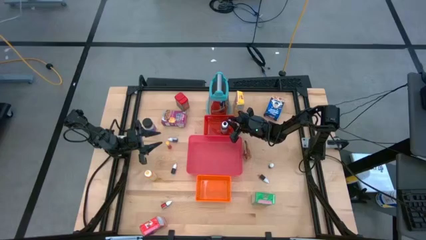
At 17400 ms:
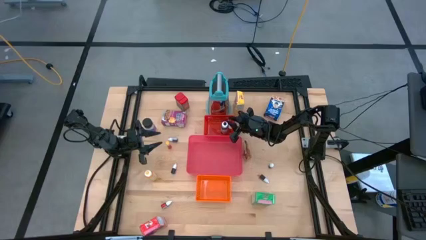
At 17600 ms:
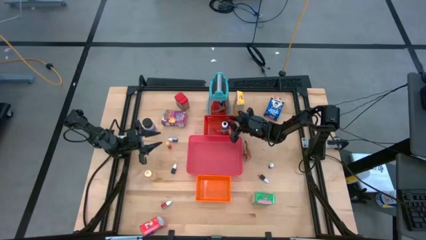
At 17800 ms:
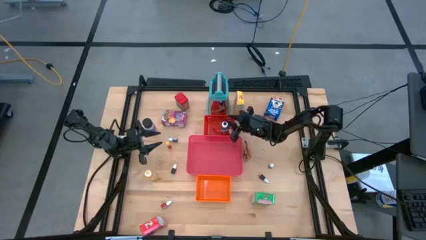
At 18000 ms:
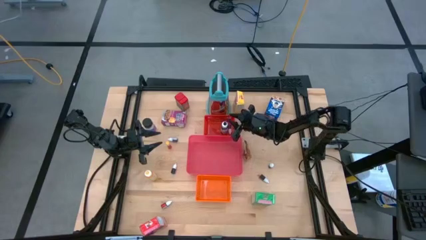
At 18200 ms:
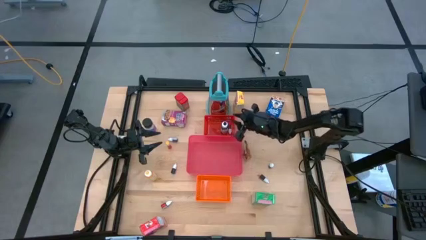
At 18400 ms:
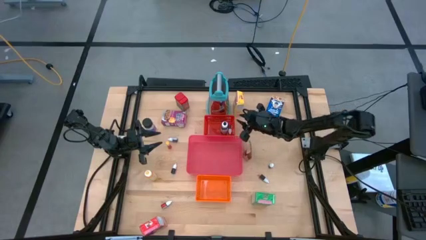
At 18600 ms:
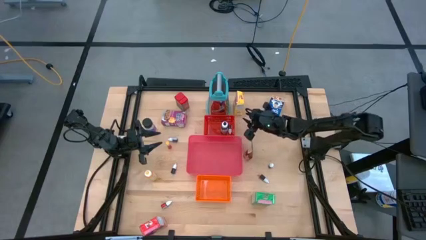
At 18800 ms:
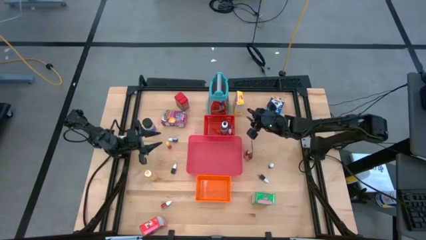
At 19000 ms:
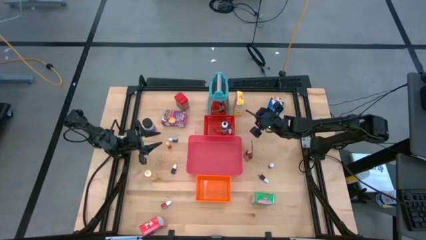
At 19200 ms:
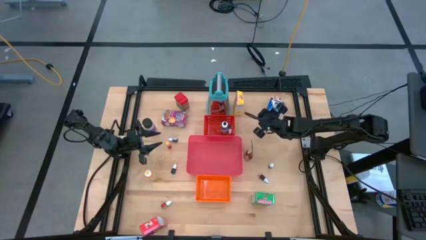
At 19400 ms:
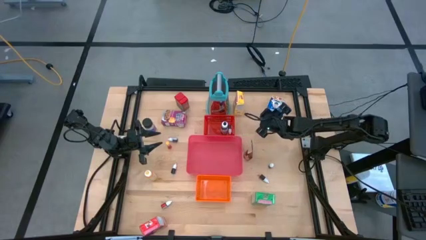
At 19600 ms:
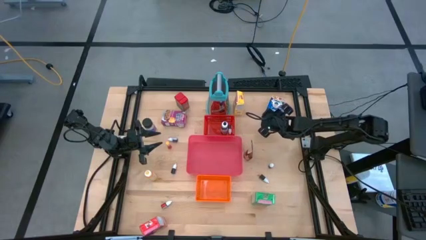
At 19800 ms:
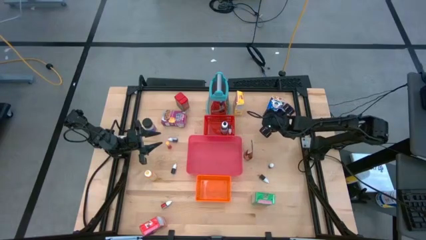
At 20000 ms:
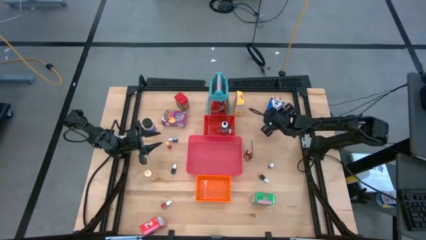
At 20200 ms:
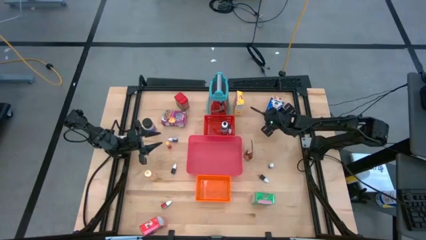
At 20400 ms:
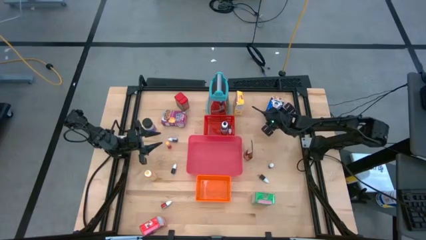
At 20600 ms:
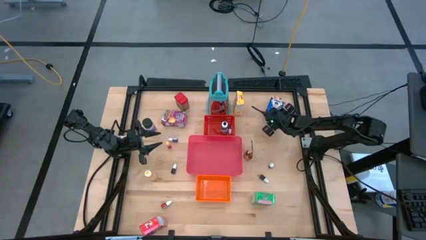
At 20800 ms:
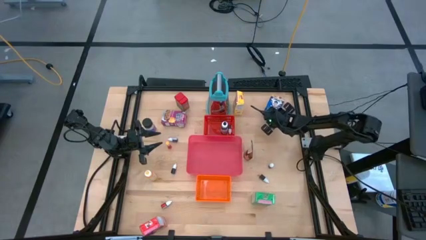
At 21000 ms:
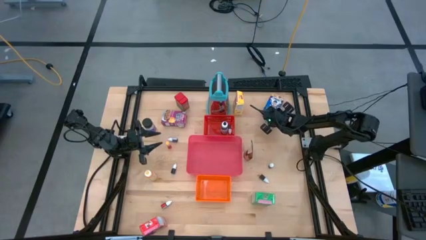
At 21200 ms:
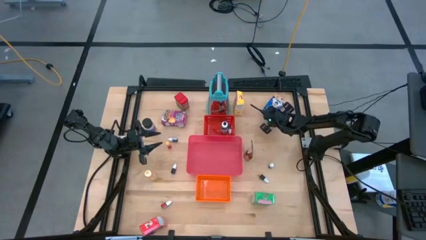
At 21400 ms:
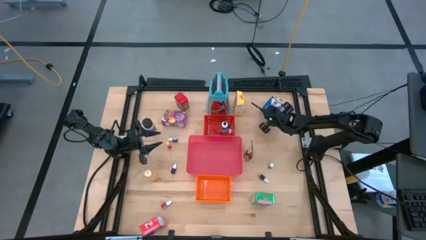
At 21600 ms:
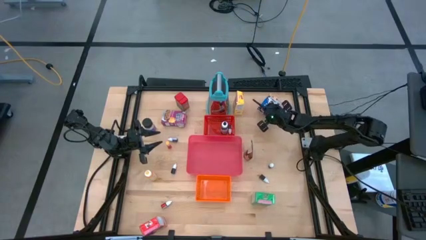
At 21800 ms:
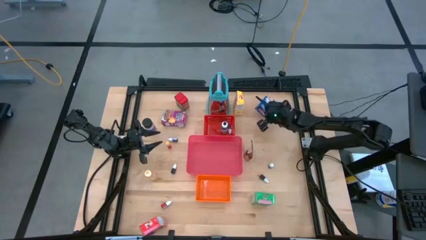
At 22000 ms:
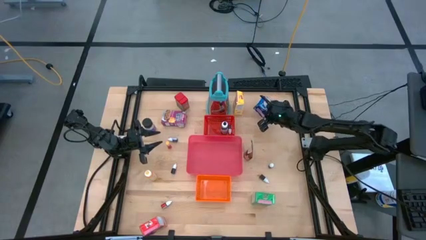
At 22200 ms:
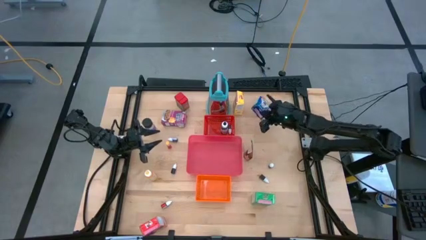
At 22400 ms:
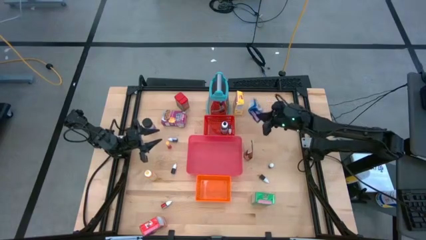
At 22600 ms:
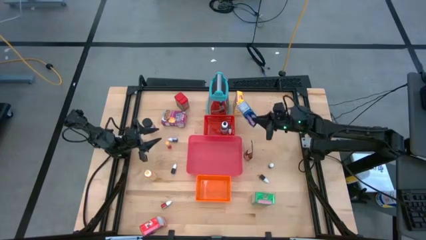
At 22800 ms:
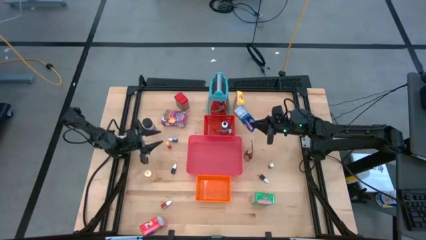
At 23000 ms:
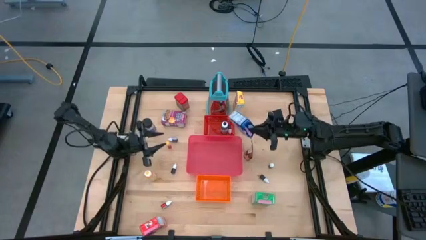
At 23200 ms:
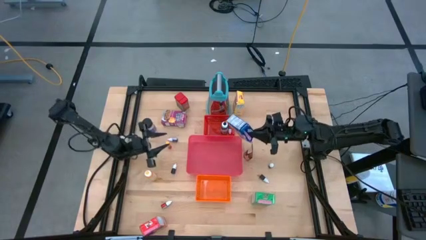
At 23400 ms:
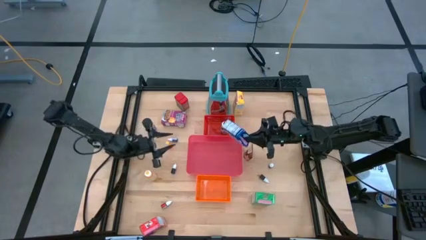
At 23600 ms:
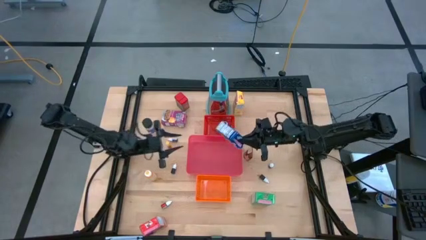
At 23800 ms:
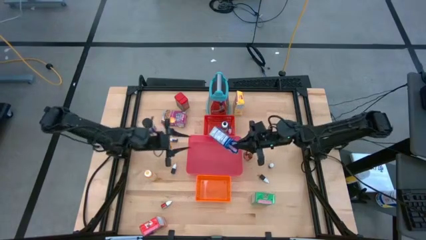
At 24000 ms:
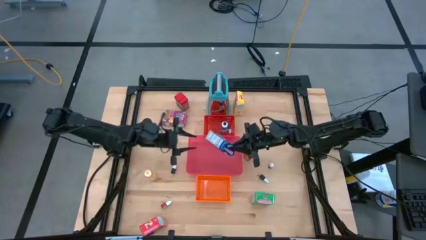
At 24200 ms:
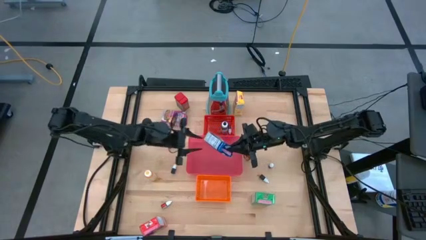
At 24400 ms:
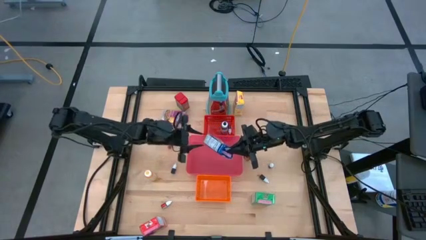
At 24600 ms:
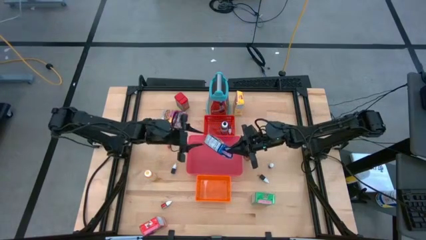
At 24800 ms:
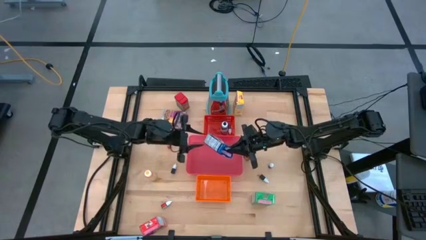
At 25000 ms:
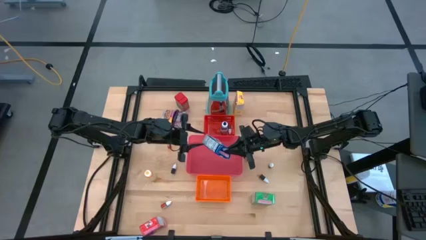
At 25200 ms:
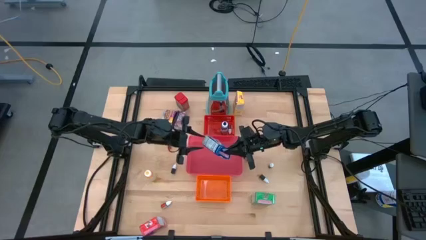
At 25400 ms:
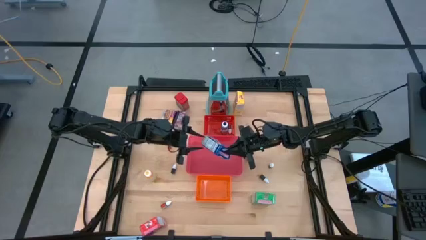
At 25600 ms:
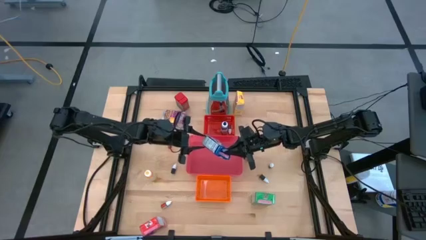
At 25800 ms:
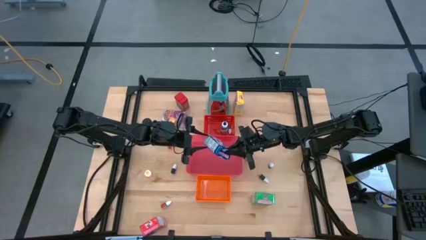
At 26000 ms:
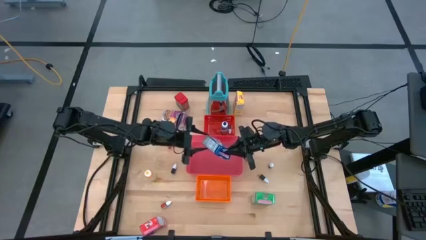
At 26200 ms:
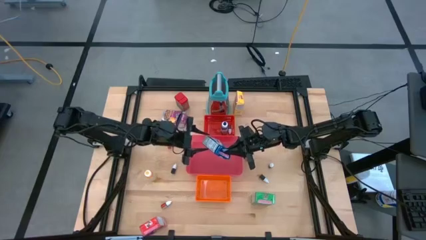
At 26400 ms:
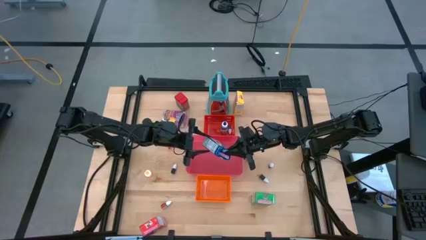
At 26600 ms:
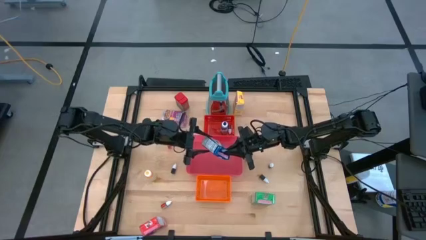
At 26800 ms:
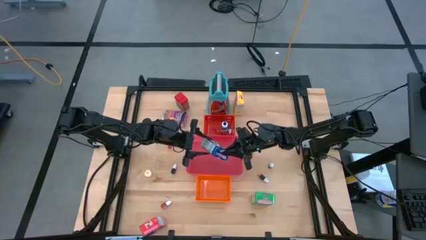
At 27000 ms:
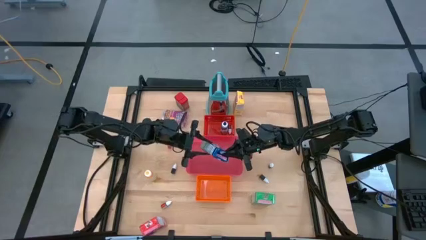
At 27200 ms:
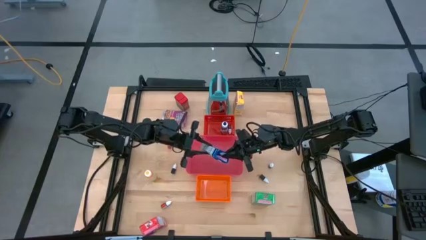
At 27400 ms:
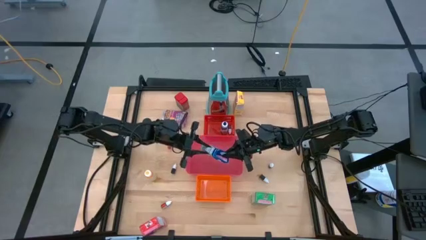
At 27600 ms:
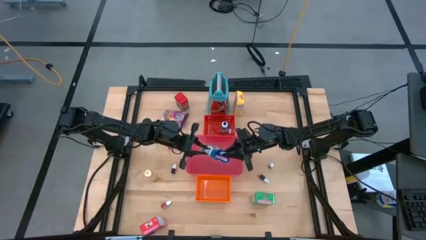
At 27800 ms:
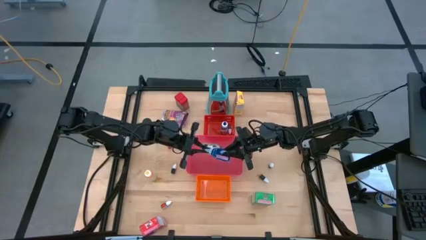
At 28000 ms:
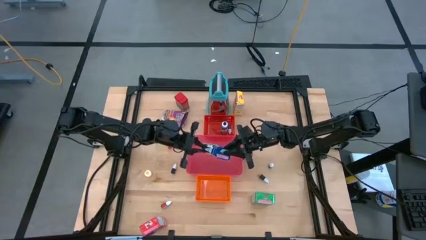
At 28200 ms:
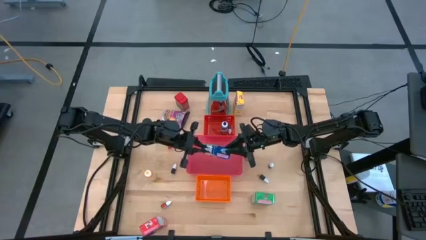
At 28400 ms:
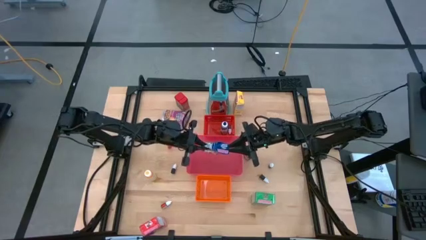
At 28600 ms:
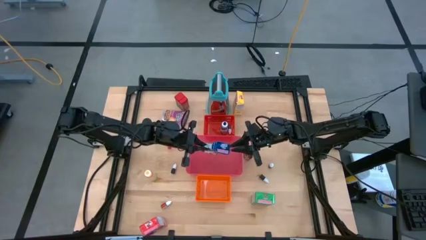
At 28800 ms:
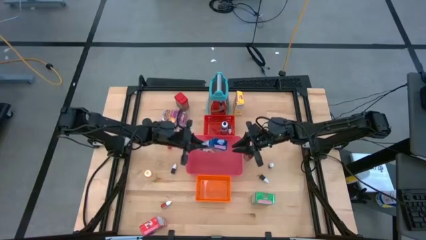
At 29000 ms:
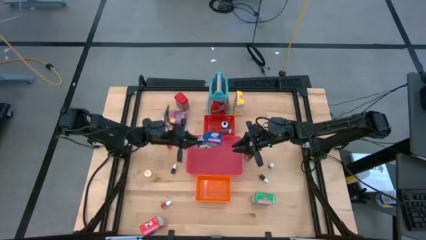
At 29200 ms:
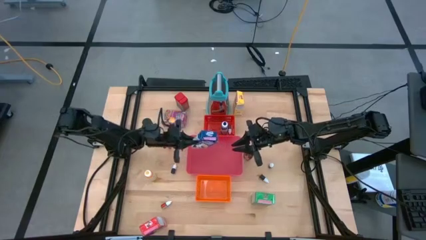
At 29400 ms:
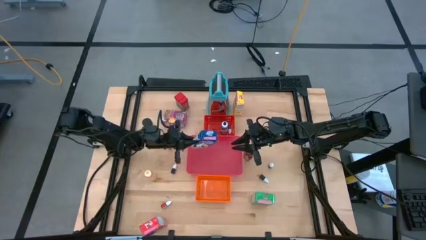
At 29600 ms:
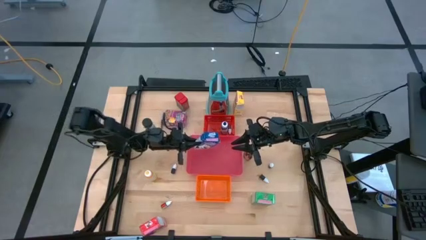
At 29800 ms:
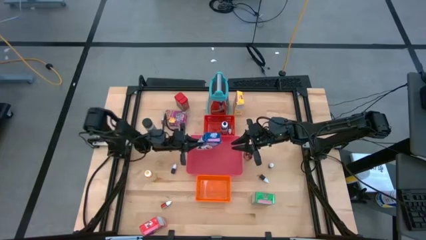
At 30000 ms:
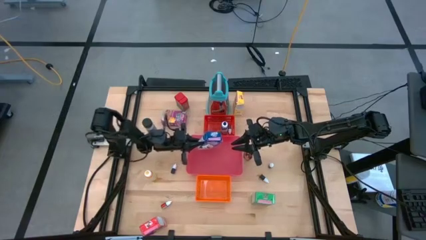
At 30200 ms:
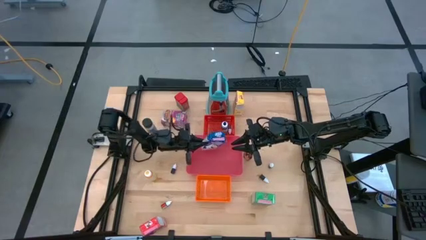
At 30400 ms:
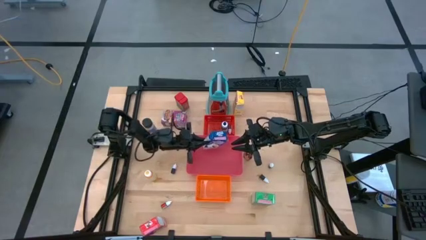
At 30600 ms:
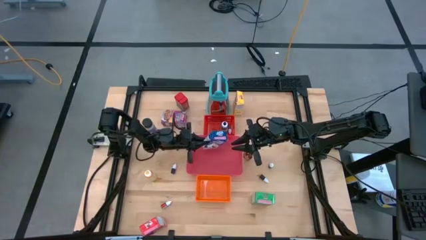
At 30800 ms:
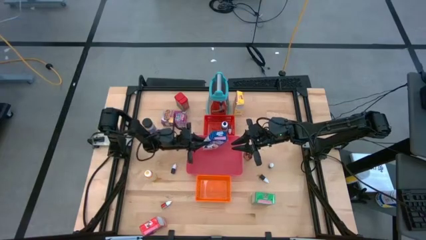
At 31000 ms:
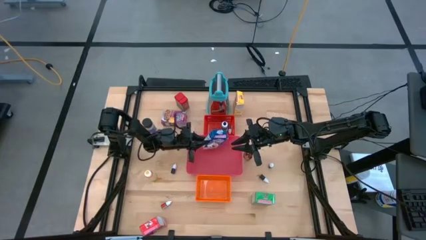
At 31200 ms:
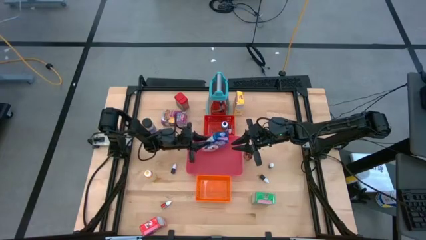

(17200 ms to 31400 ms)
Task: Pick & Place Kitchen Items
Put the blue cereal box into the pink bin
